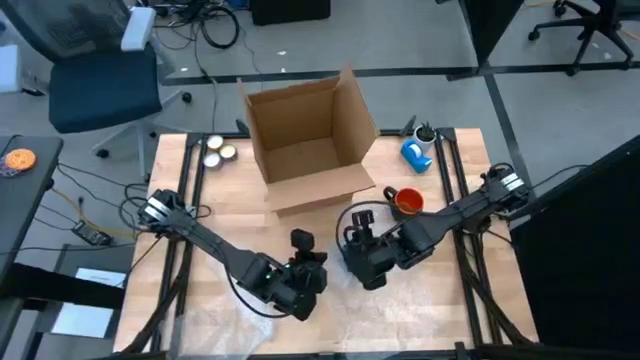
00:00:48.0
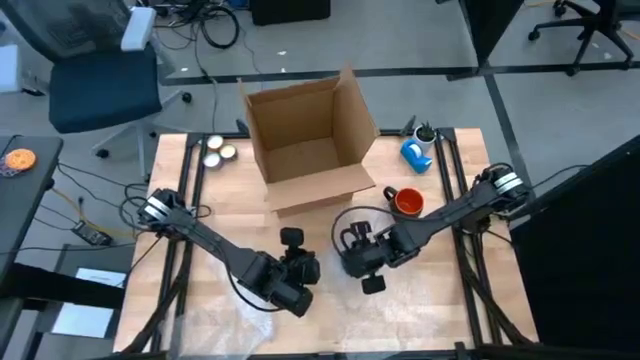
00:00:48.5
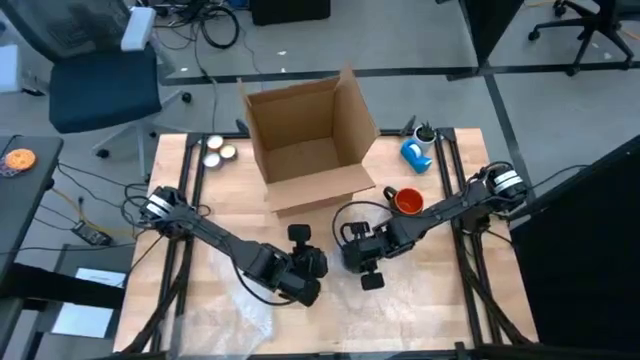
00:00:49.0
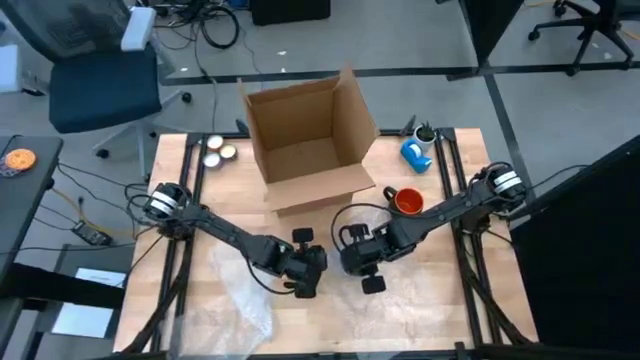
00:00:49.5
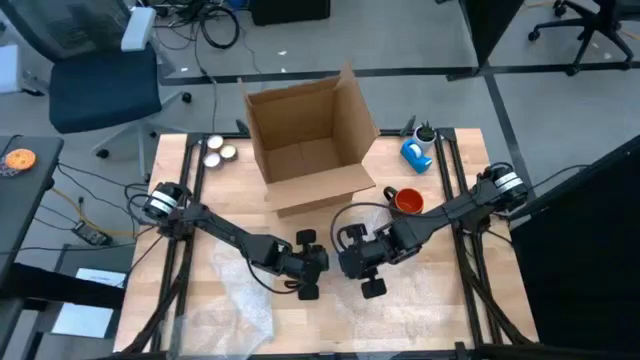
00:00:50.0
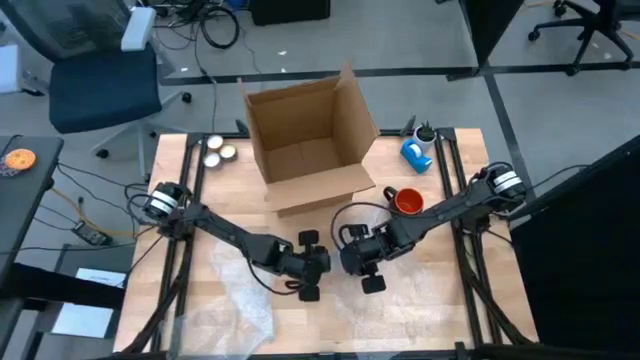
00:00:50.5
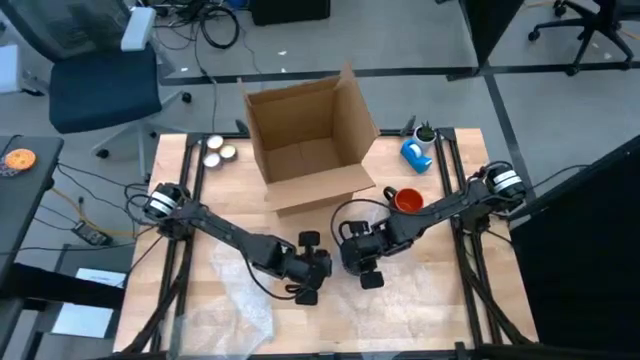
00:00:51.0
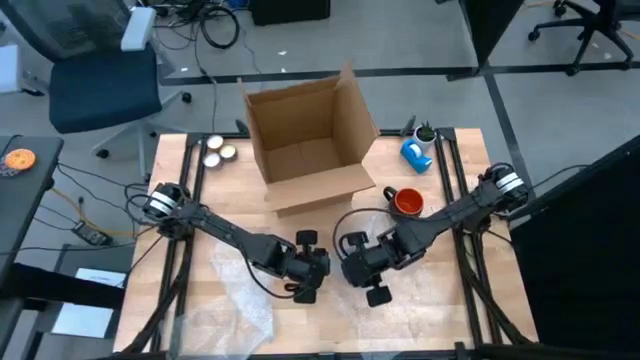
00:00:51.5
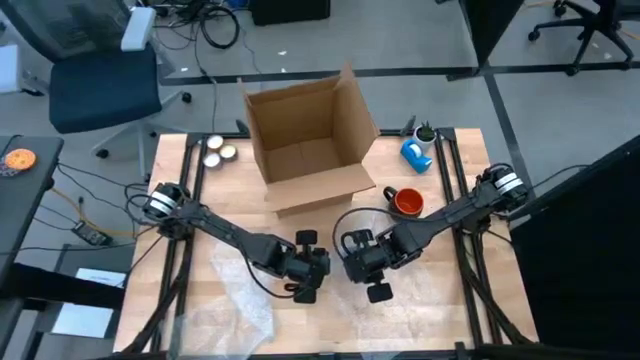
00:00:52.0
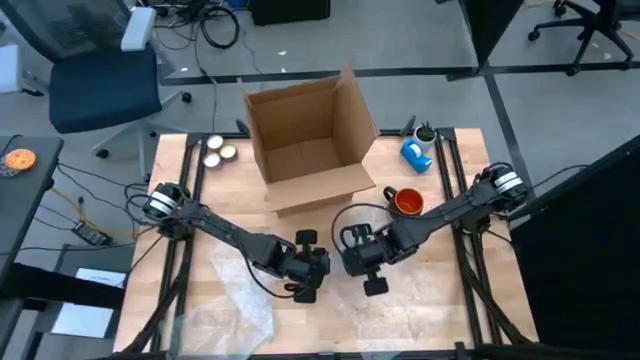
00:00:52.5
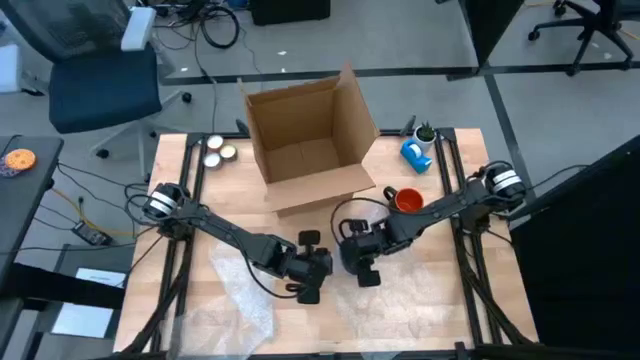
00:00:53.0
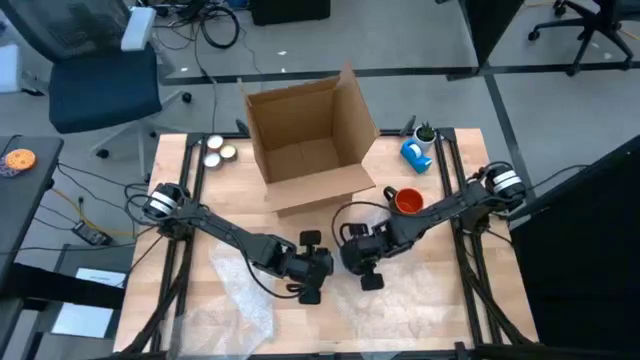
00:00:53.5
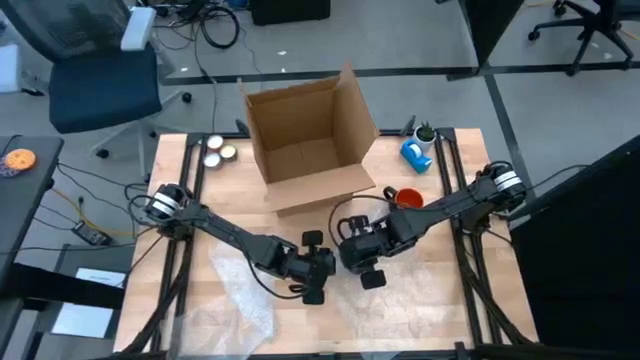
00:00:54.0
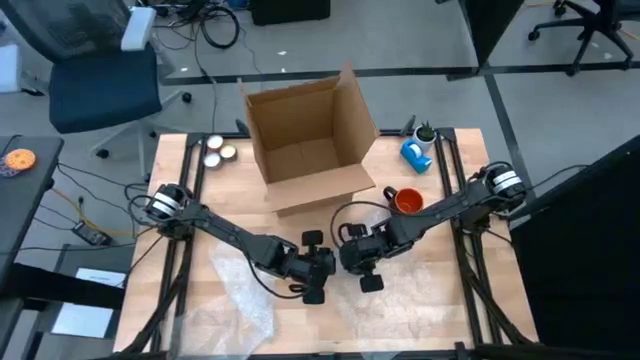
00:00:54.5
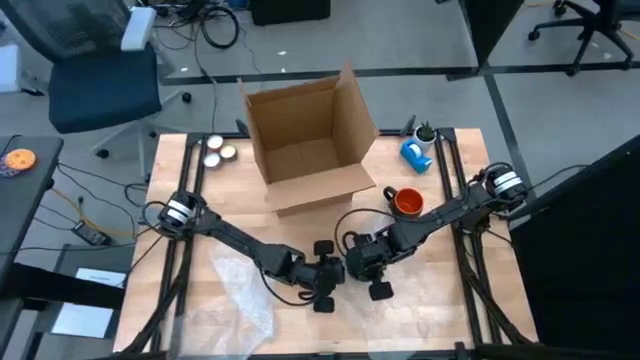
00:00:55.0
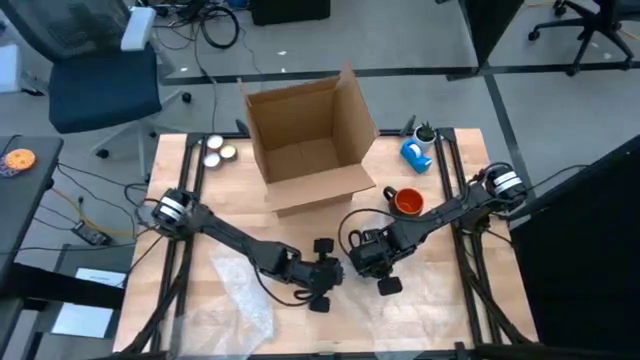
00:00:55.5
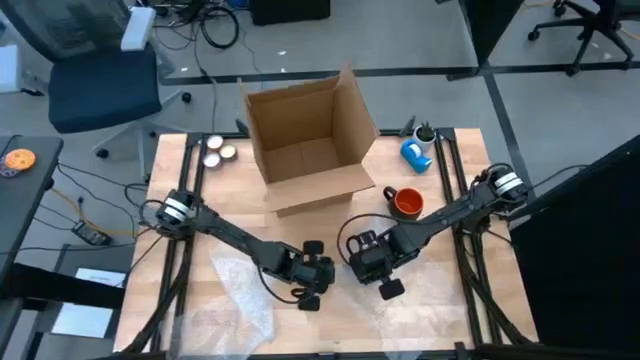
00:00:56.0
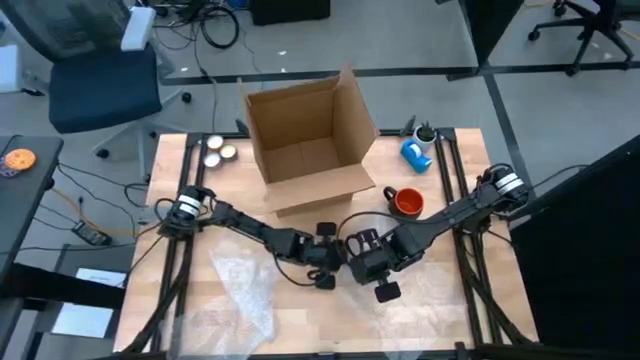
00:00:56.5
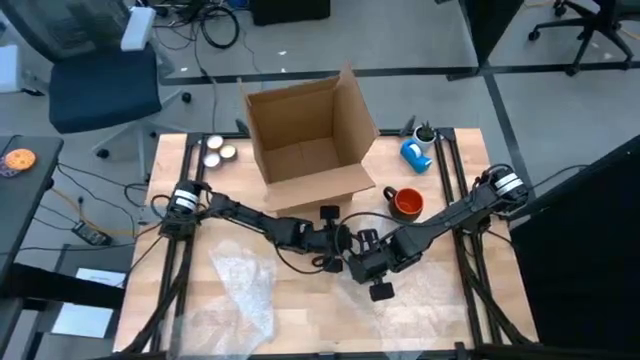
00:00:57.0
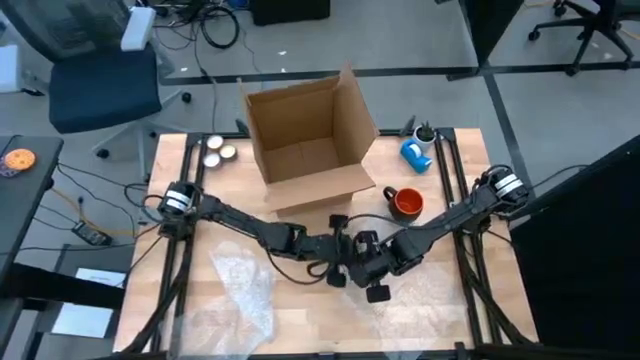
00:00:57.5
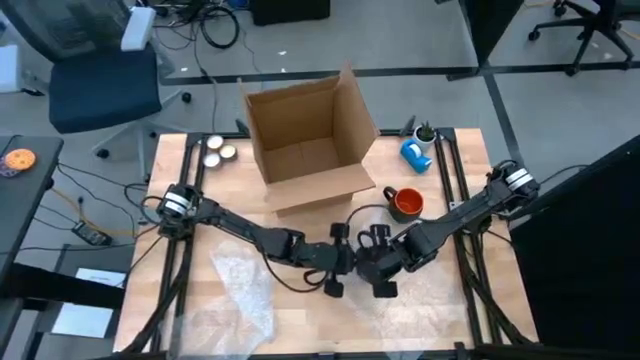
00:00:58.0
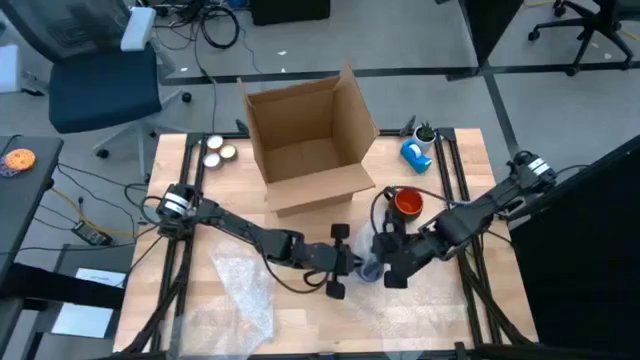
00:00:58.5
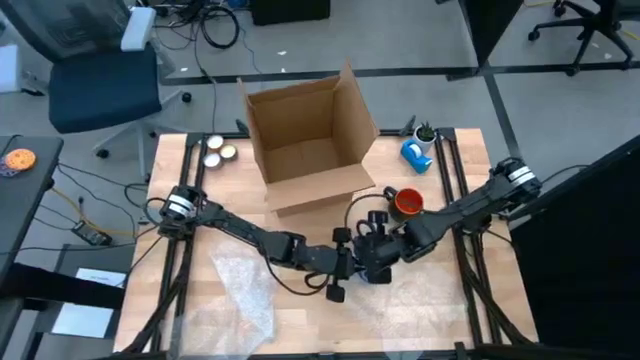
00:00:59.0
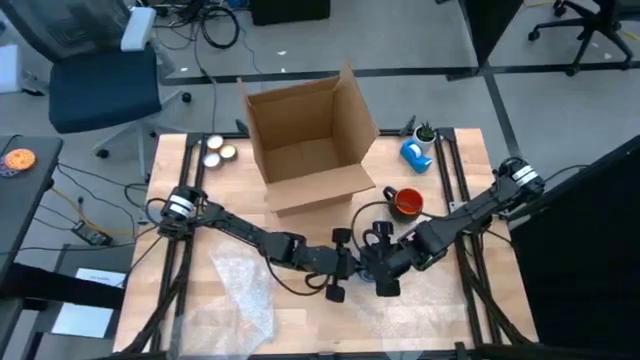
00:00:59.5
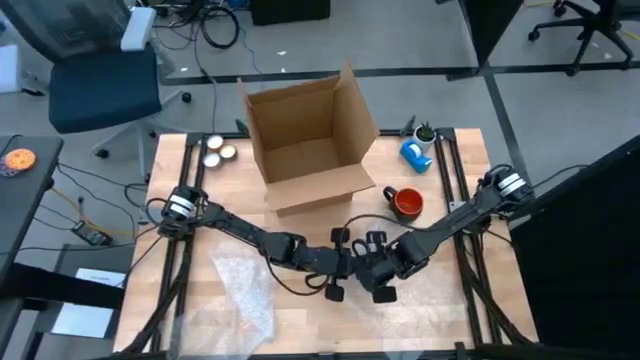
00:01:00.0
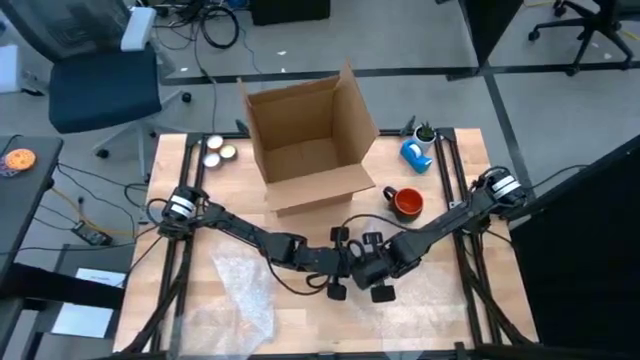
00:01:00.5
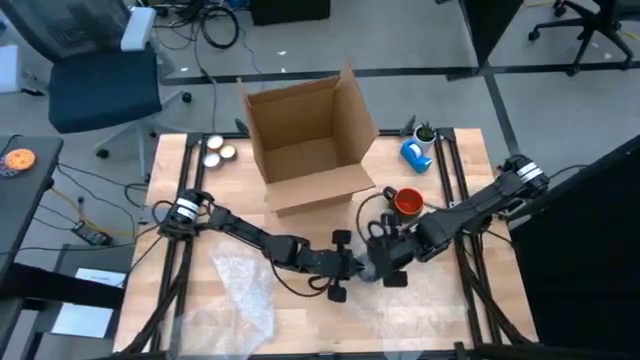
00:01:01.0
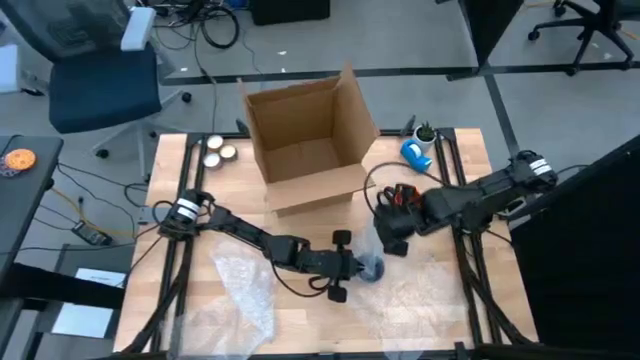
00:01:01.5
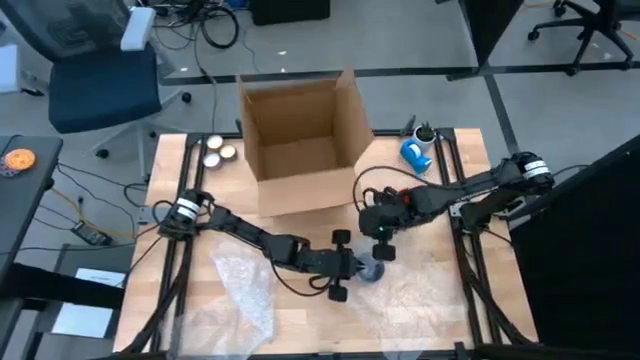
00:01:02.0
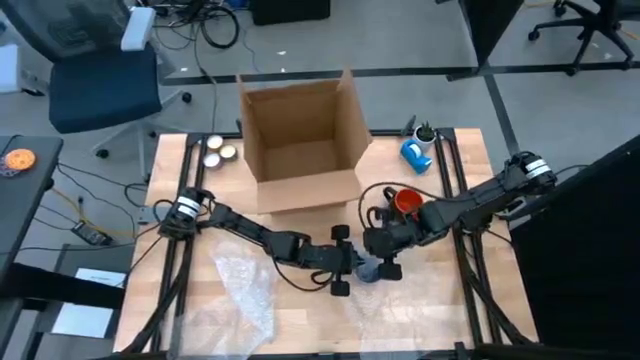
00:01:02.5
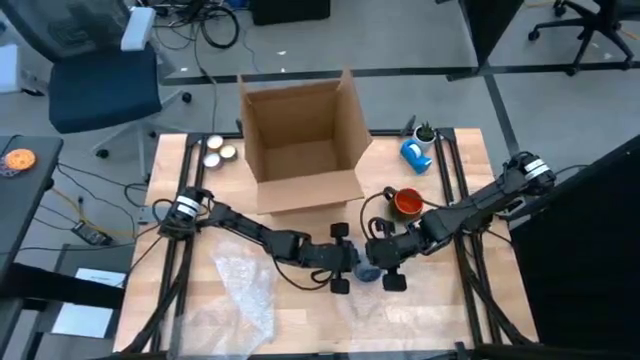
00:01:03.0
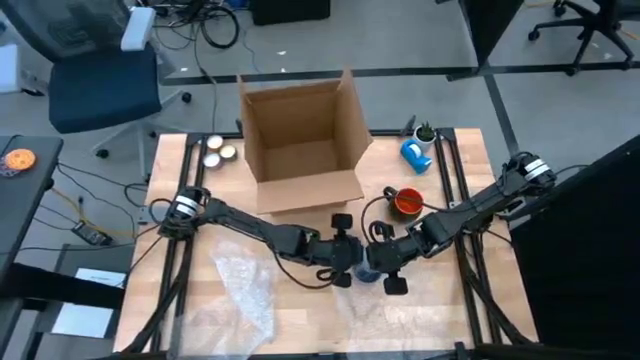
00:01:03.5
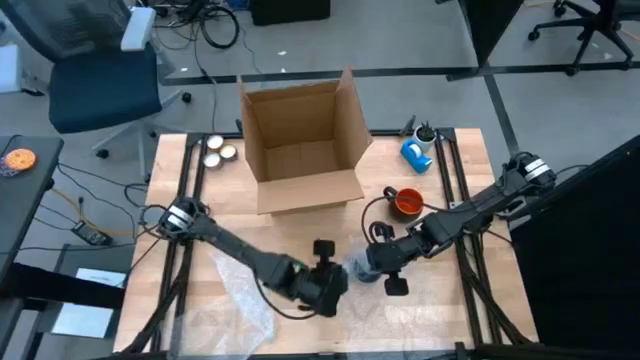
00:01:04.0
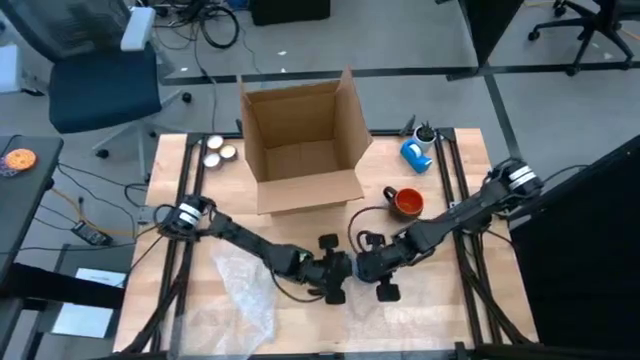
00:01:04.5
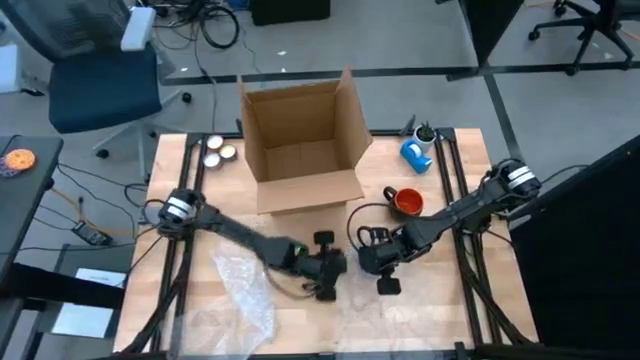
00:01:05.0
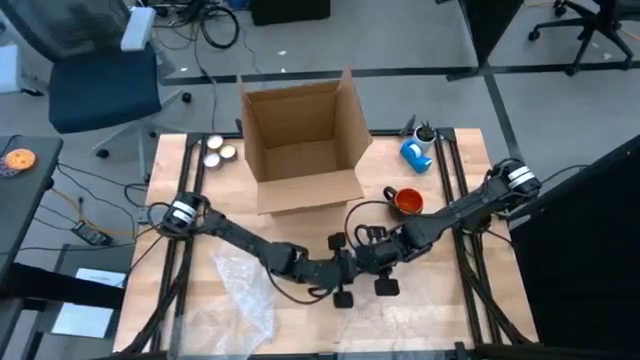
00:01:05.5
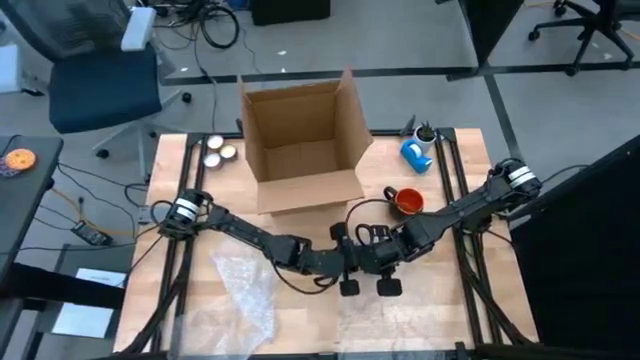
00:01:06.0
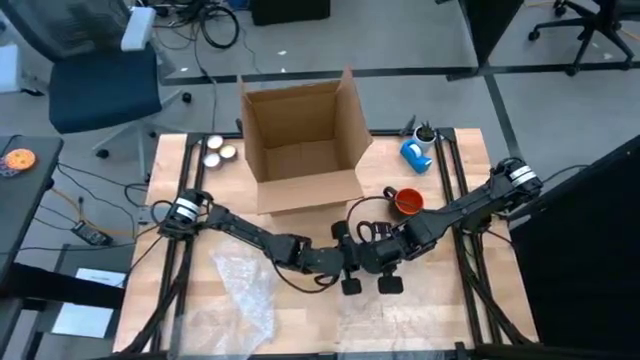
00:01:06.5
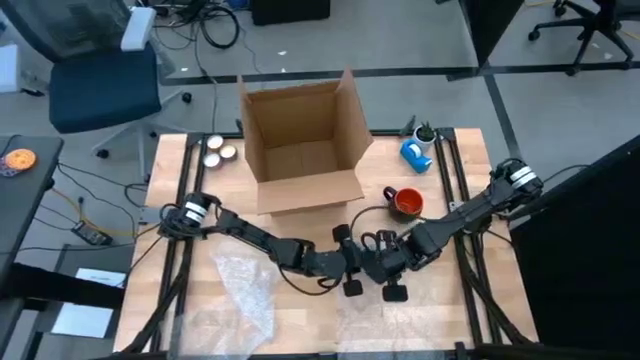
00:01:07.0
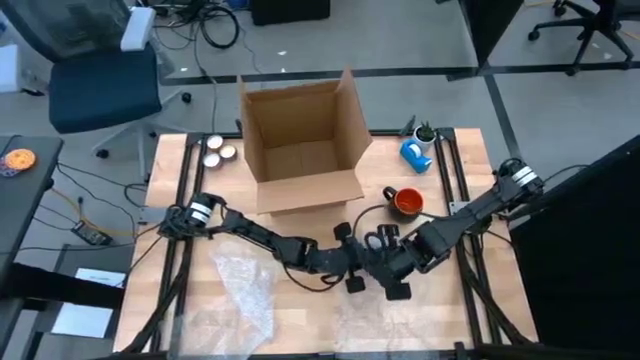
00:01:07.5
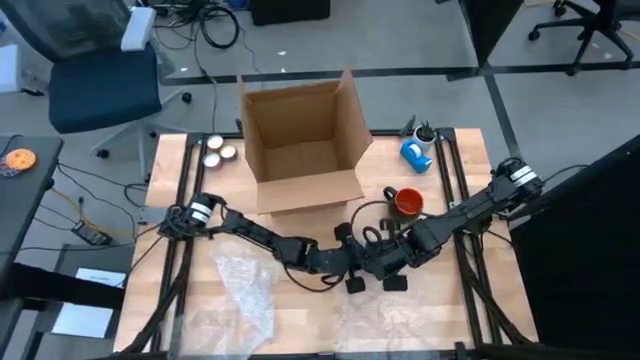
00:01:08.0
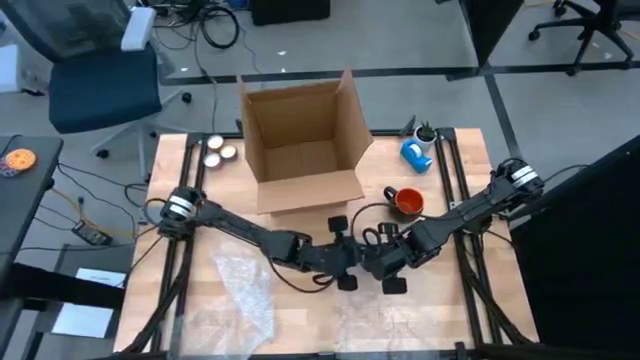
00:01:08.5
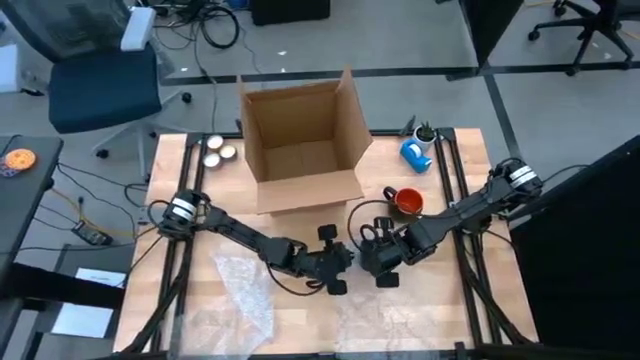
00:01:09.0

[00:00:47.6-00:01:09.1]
Task: wrap mug
Wrap the blue mug with the top bubble wrap
